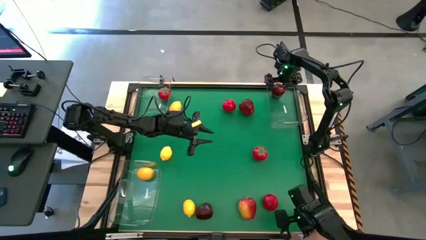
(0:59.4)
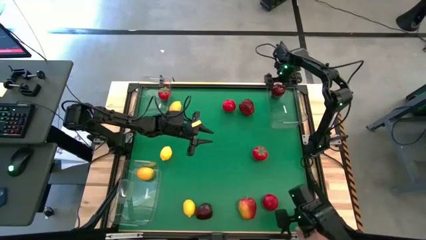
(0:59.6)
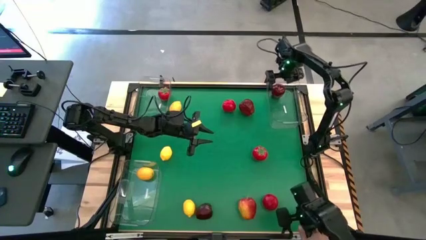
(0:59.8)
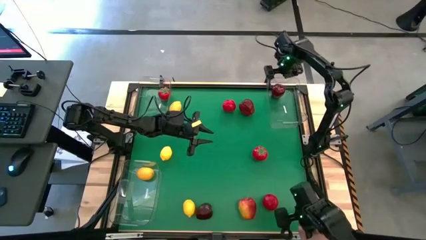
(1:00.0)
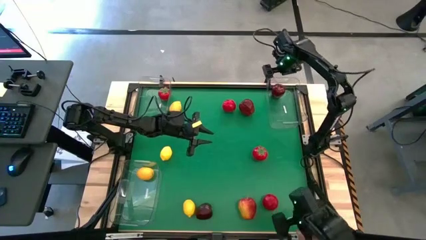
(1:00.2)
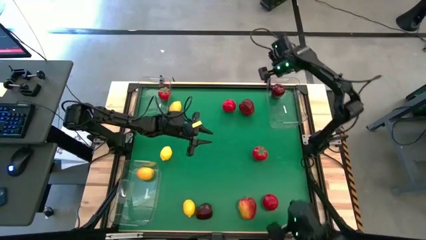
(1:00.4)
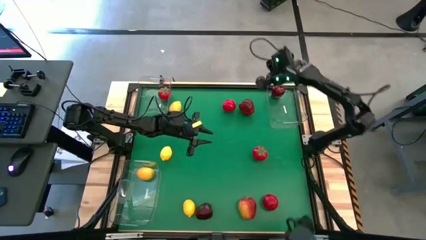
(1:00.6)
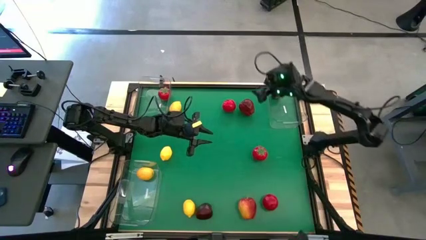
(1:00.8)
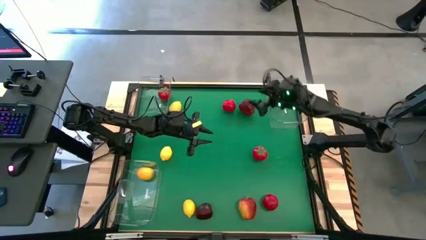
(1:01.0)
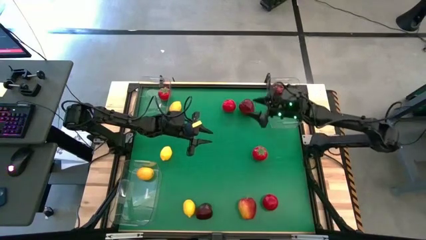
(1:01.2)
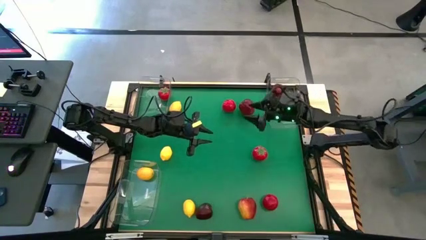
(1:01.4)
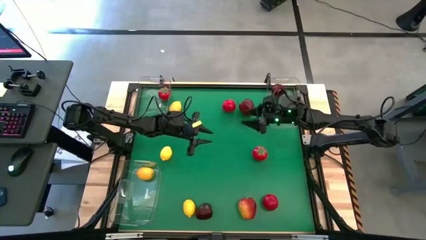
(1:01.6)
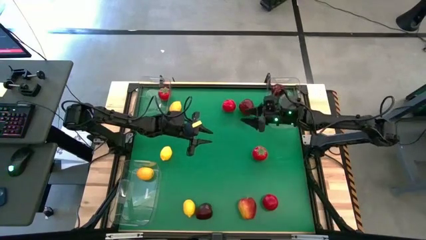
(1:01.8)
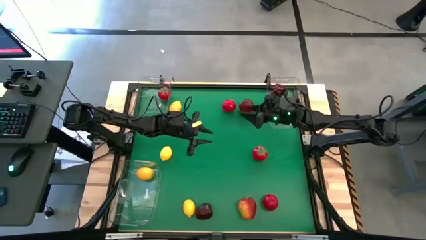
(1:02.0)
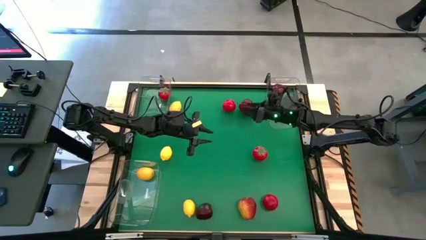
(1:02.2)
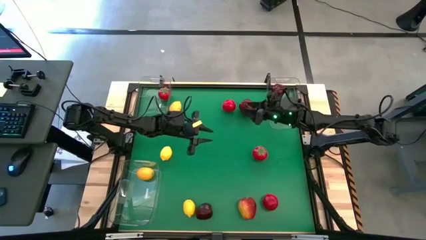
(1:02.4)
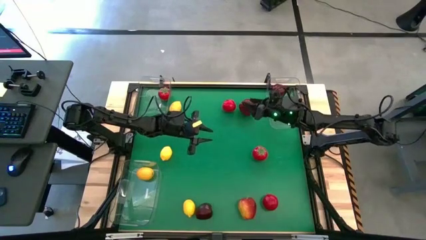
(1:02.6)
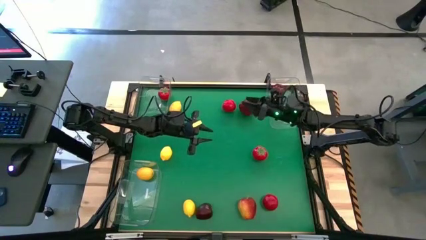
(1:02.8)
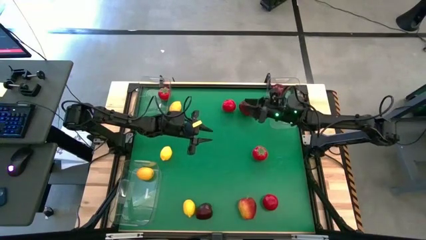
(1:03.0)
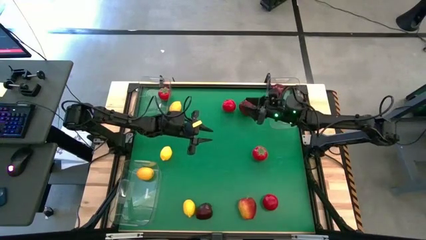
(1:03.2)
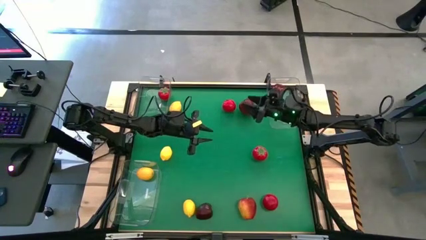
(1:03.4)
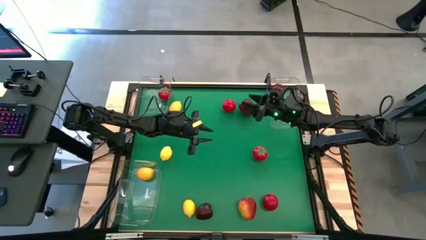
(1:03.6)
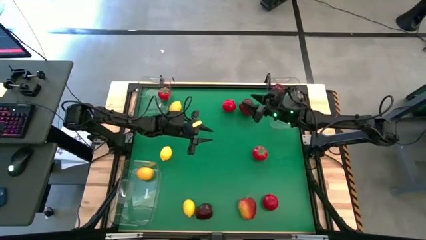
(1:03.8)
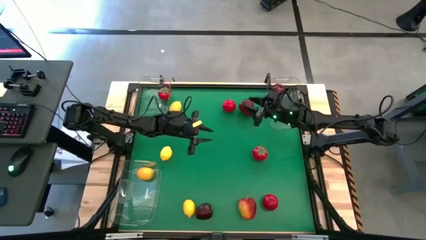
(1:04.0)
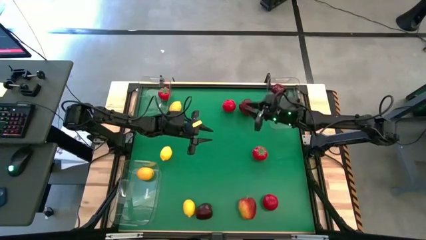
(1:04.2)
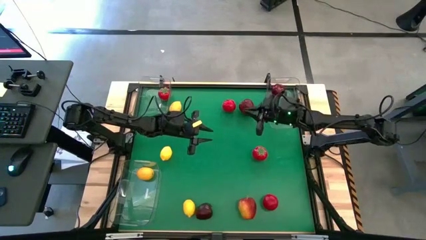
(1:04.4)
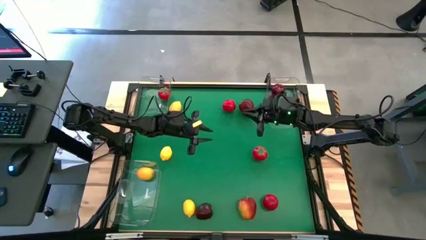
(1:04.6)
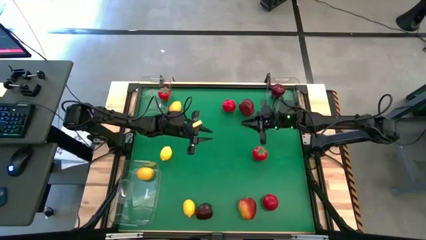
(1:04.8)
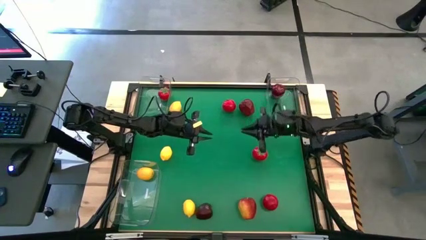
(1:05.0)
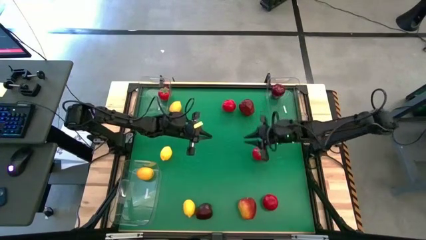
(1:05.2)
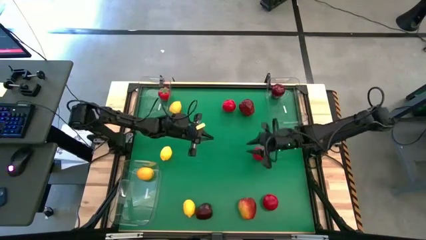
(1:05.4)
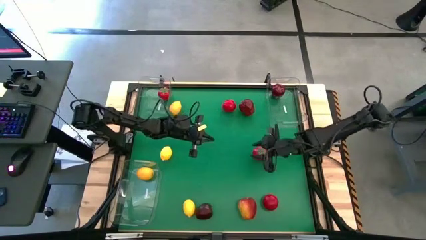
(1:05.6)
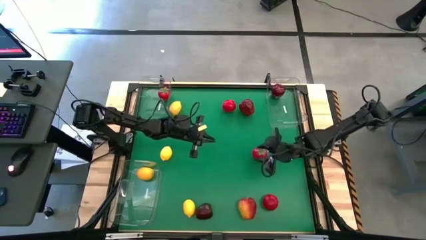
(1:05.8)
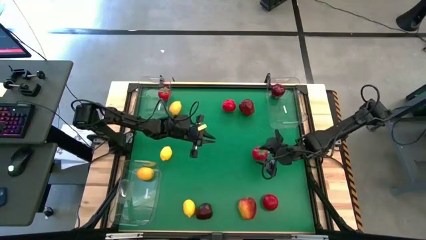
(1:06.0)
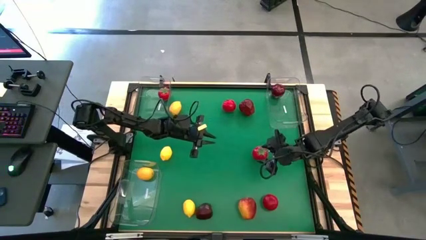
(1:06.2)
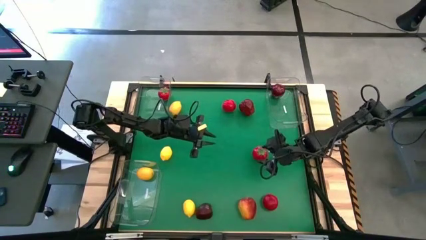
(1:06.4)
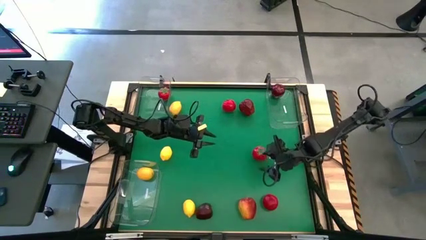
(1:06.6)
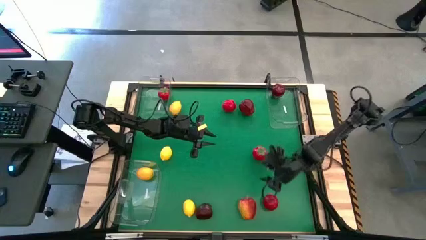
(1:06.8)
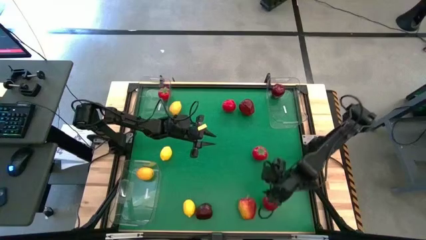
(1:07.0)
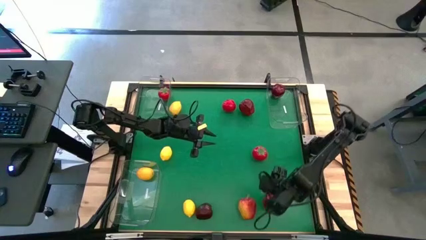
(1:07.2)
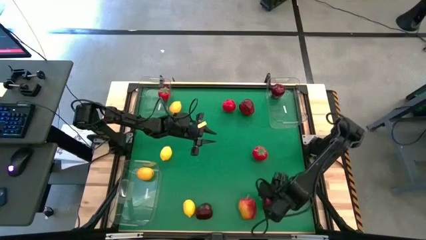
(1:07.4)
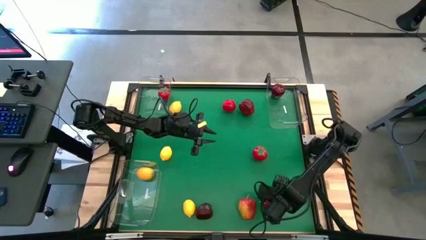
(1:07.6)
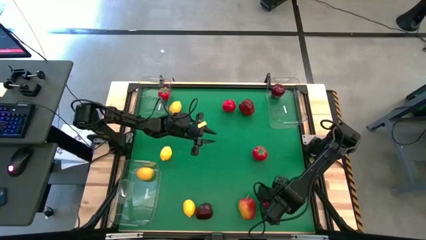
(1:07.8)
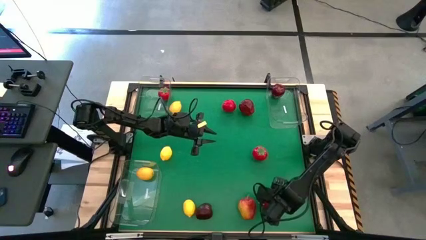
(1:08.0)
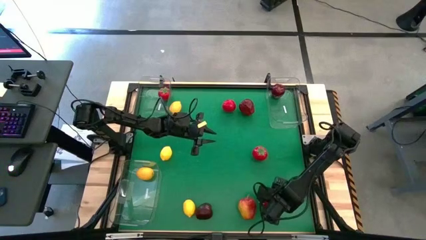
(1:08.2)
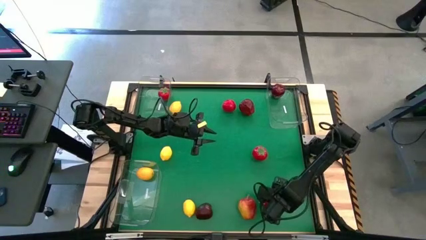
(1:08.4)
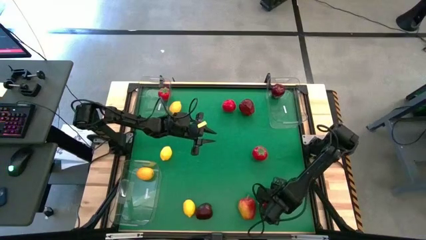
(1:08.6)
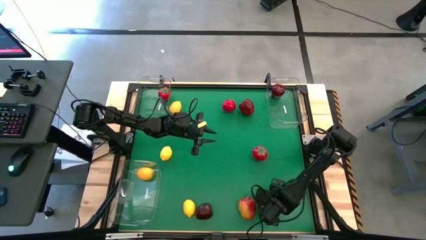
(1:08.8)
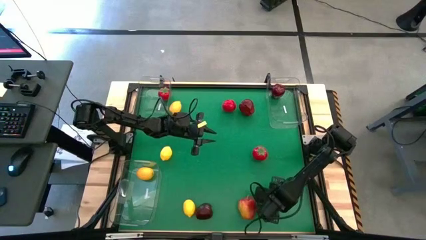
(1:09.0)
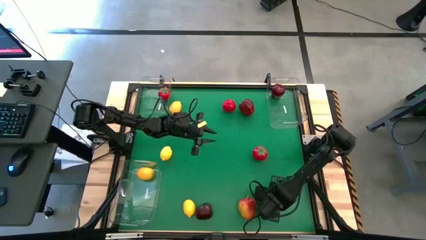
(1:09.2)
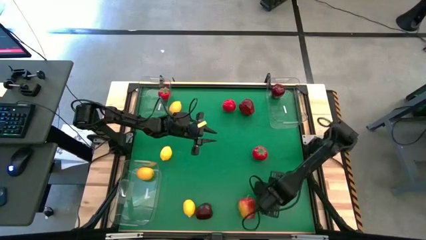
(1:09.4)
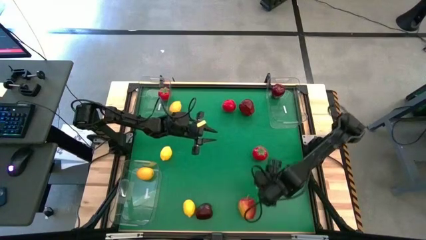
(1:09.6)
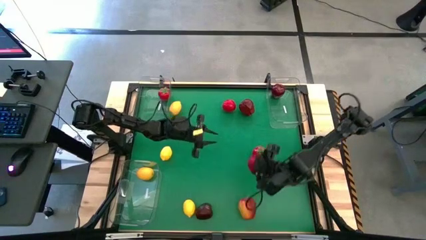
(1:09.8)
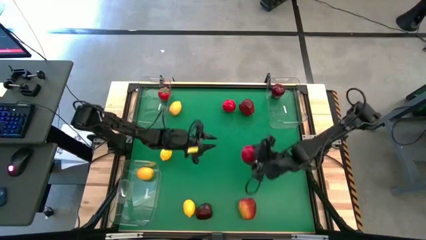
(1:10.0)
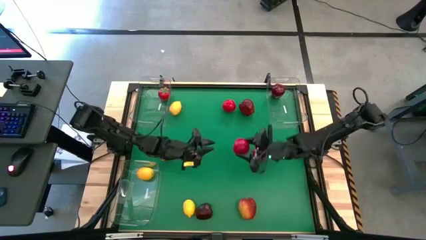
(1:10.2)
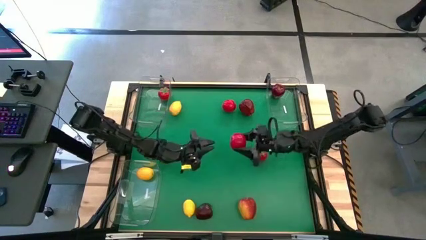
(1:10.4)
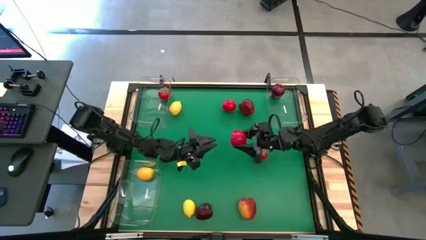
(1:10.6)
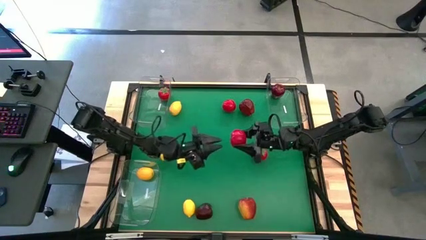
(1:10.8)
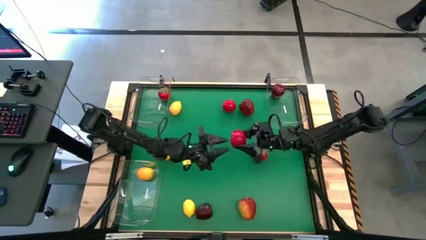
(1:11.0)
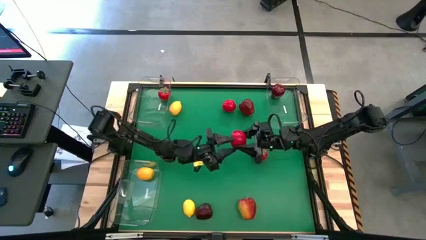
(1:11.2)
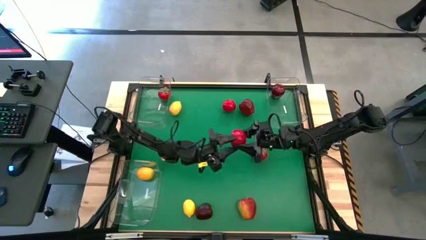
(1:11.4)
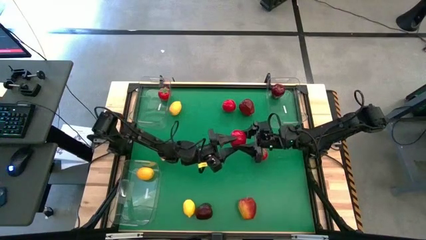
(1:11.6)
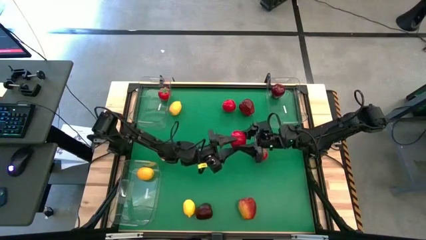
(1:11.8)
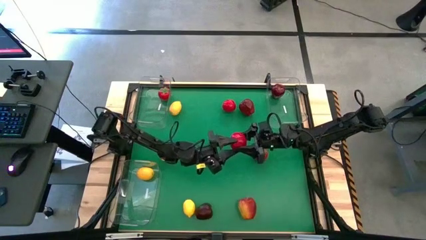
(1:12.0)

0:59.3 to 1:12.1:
Task: Sort produce into baskets
Put the tomato into the top left bin

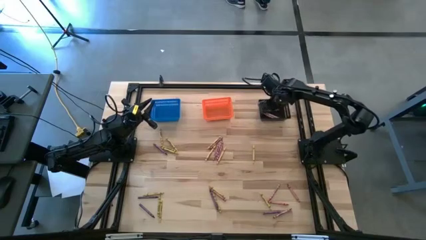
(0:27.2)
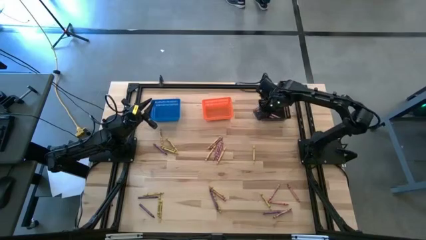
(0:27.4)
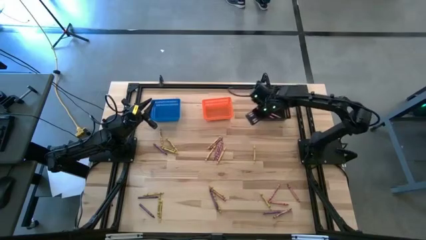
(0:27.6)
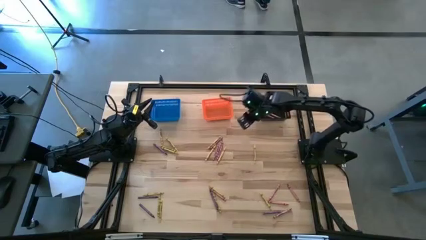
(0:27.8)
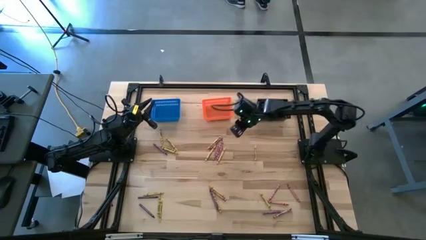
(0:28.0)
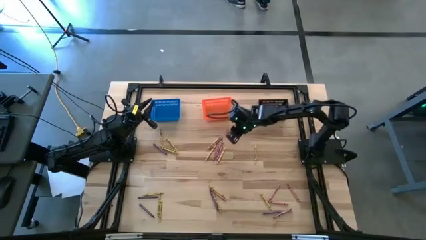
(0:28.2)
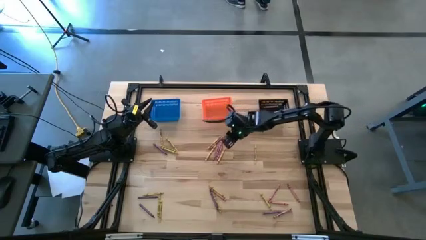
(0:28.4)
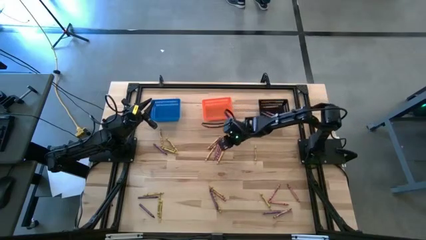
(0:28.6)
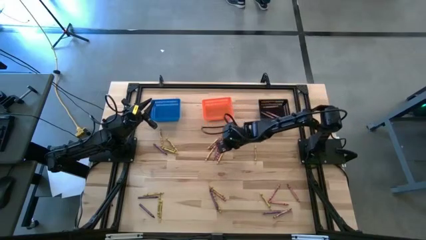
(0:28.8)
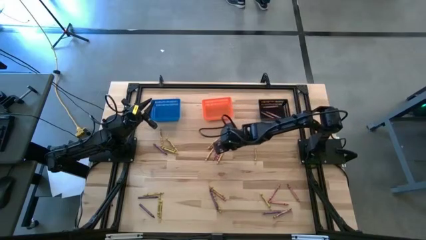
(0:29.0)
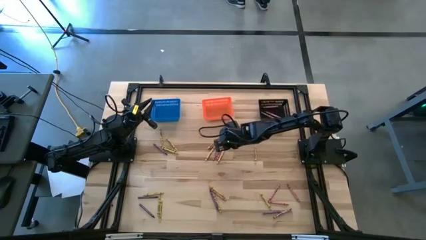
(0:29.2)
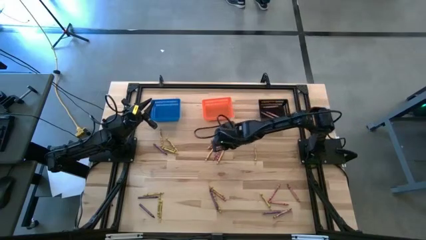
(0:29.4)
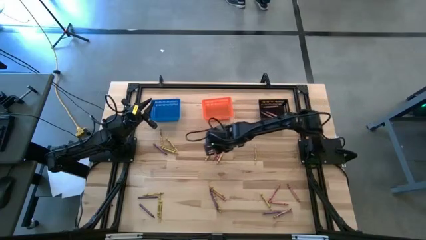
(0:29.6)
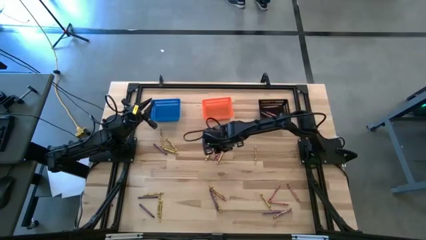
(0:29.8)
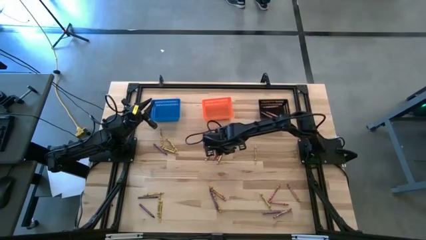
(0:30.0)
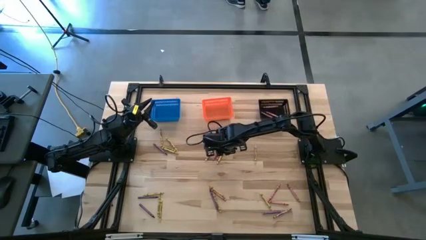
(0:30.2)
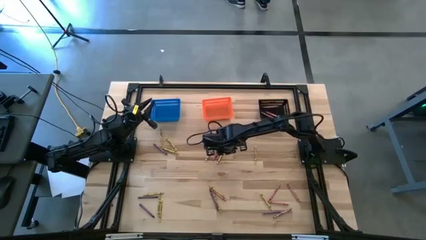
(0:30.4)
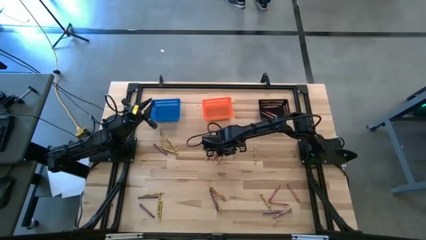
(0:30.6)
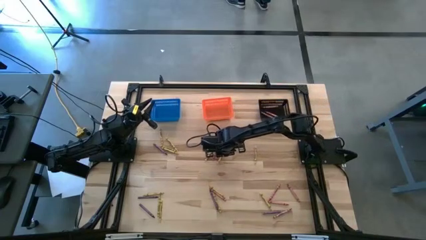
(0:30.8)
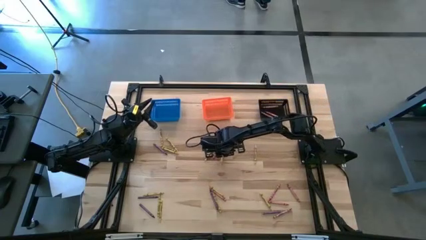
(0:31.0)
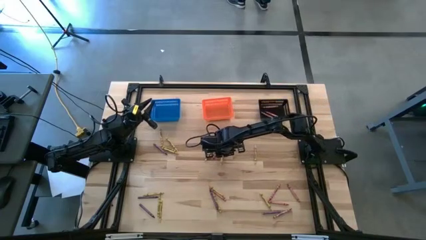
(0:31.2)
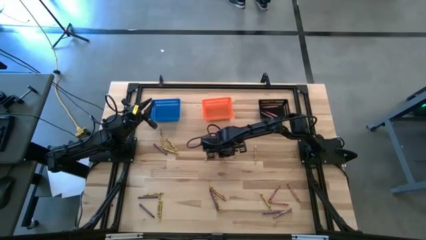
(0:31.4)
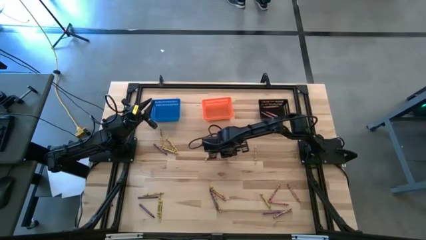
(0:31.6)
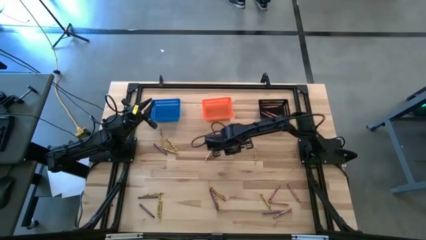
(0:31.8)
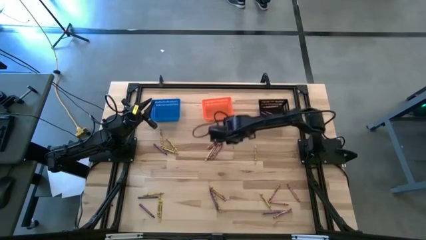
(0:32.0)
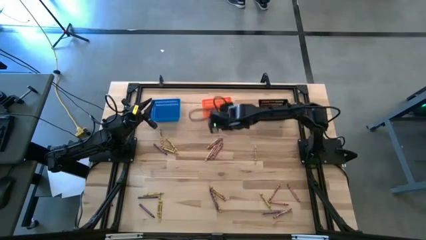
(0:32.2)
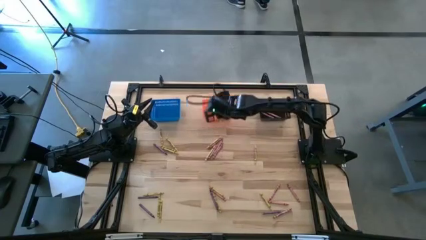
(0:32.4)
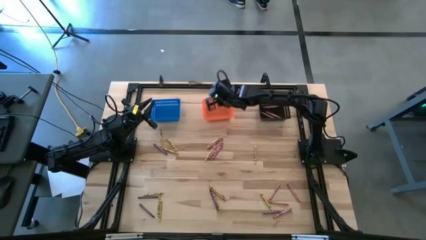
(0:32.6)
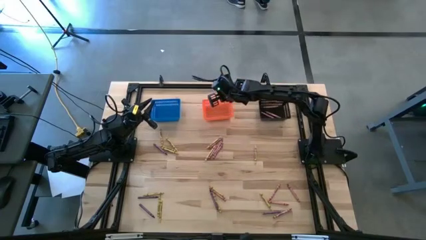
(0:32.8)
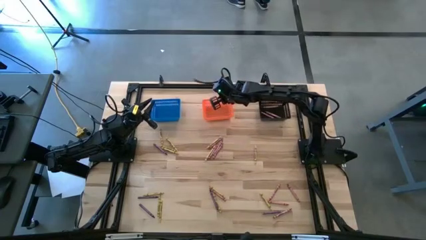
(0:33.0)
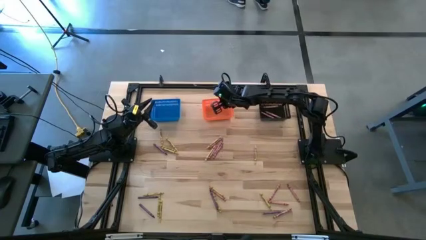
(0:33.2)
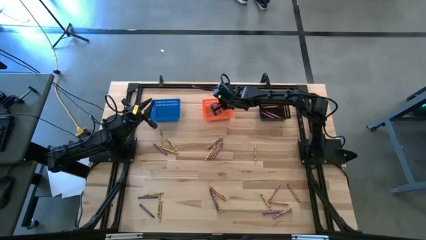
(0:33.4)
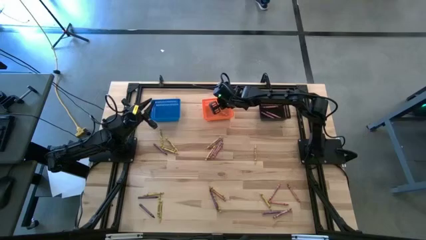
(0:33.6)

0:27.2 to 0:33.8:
Task: Sort crayons
Put the yellow crayon into the orange bin
